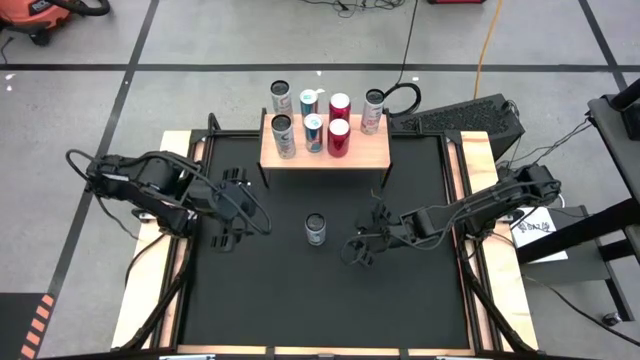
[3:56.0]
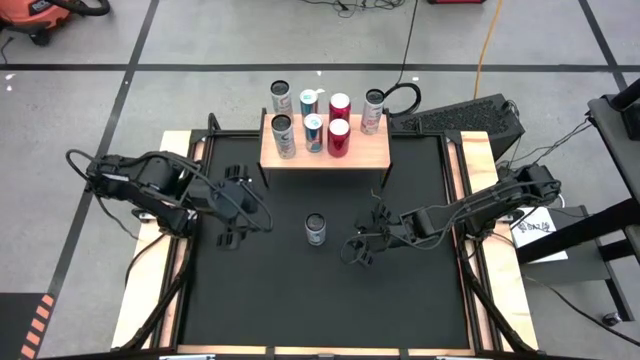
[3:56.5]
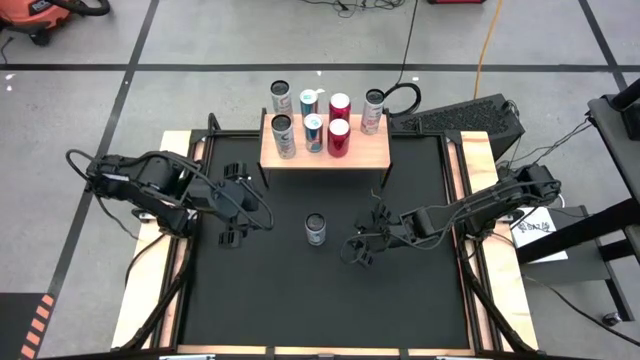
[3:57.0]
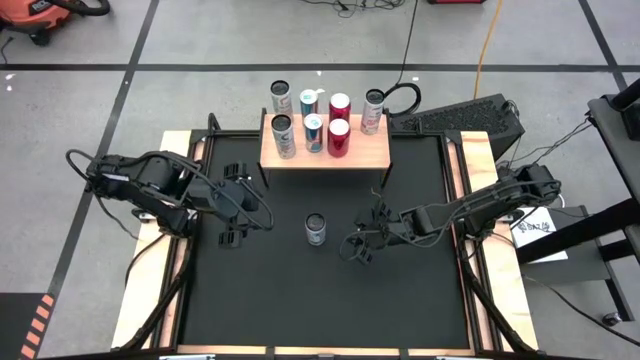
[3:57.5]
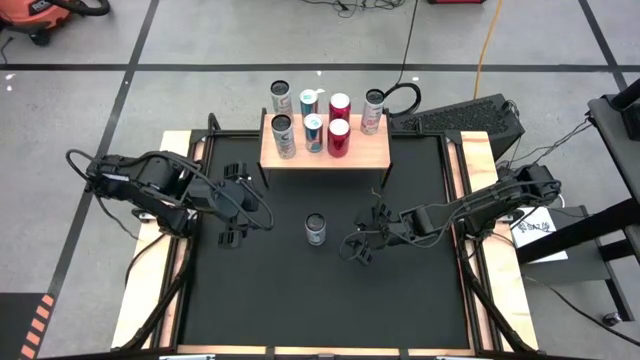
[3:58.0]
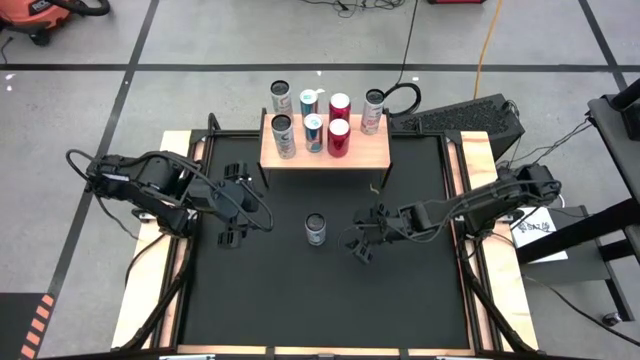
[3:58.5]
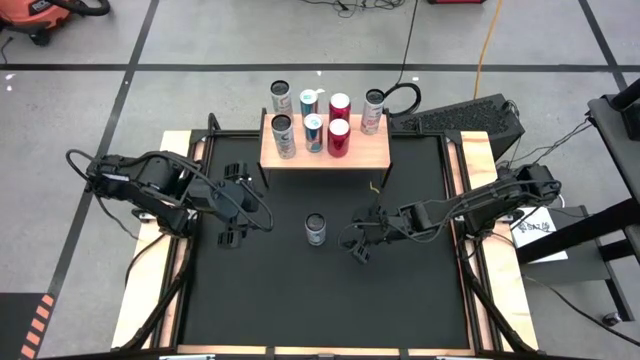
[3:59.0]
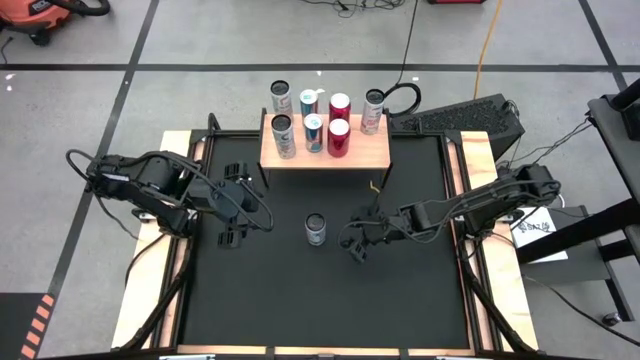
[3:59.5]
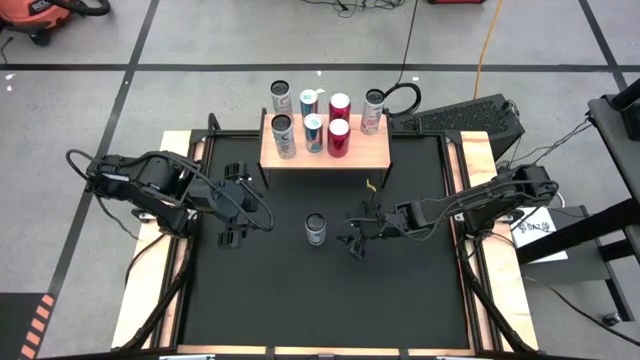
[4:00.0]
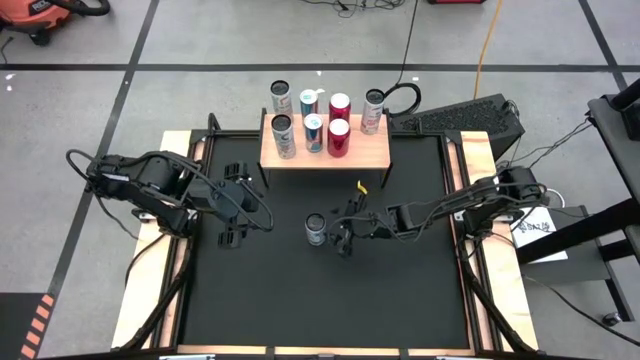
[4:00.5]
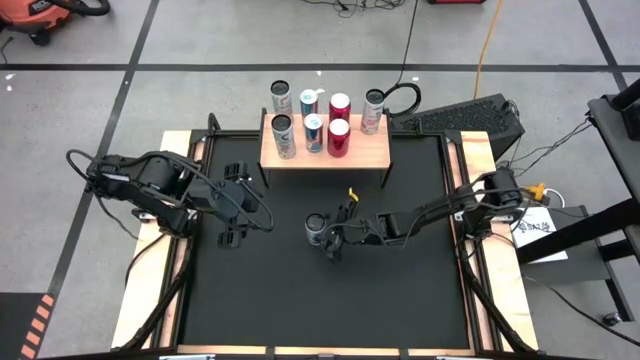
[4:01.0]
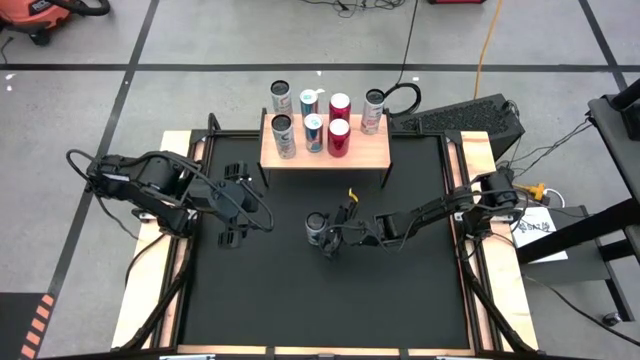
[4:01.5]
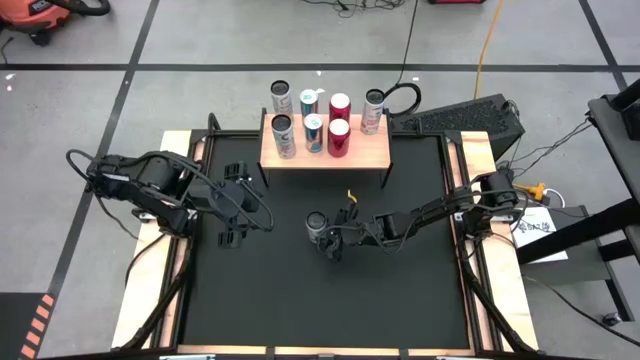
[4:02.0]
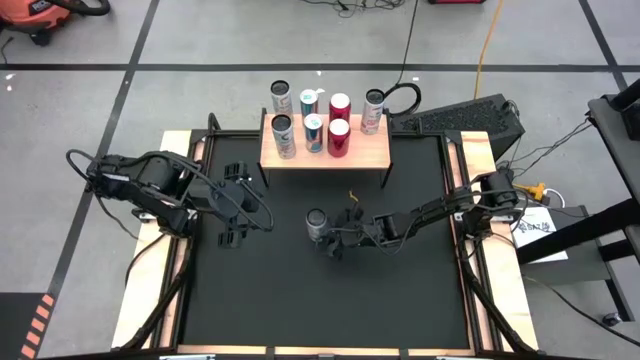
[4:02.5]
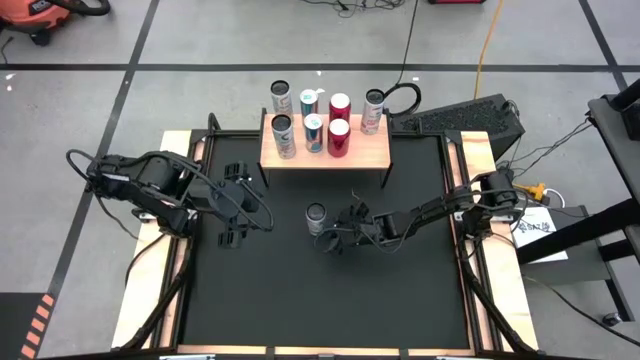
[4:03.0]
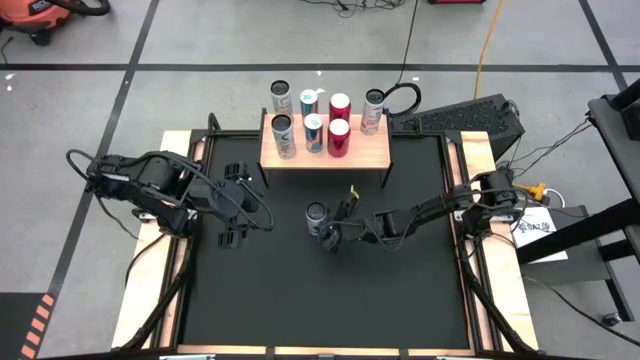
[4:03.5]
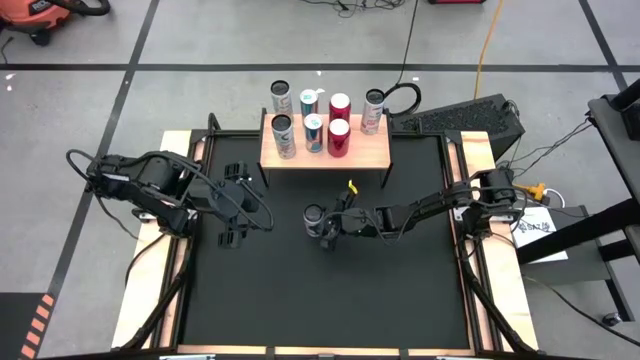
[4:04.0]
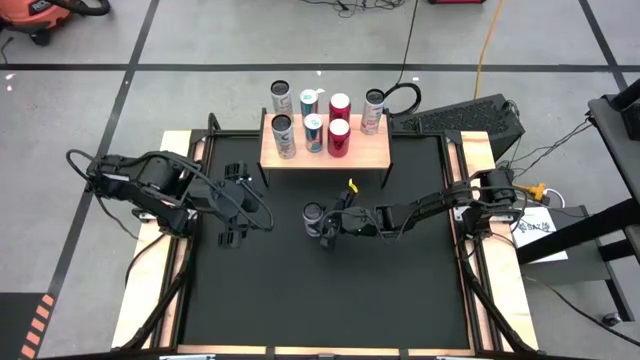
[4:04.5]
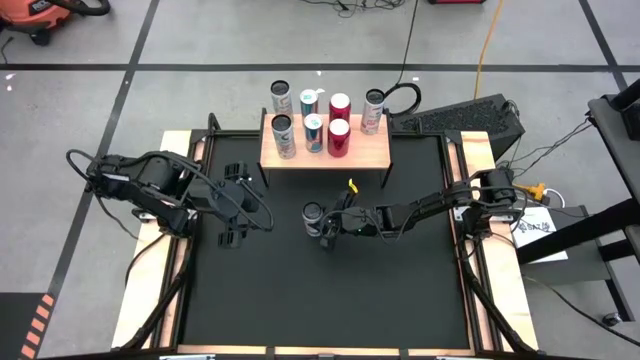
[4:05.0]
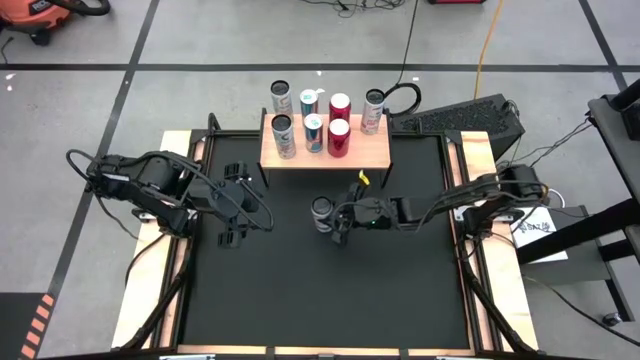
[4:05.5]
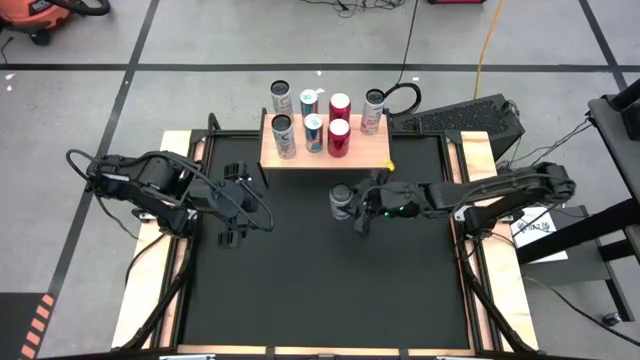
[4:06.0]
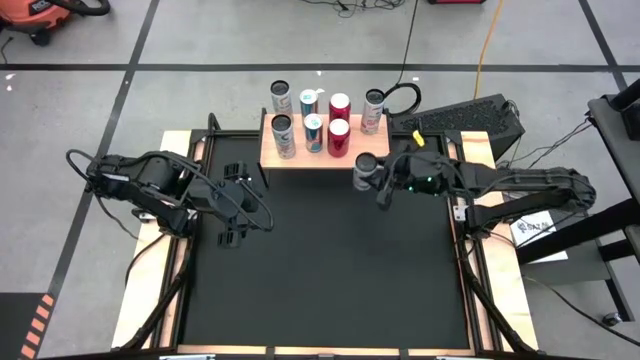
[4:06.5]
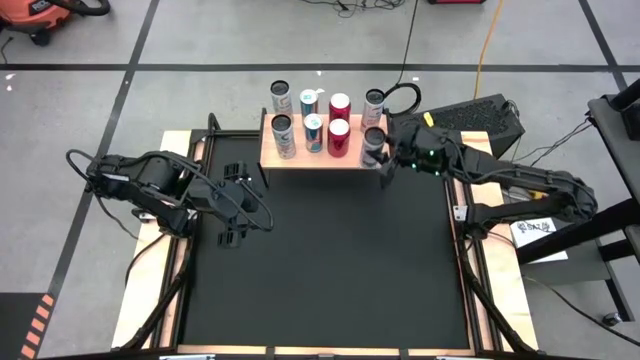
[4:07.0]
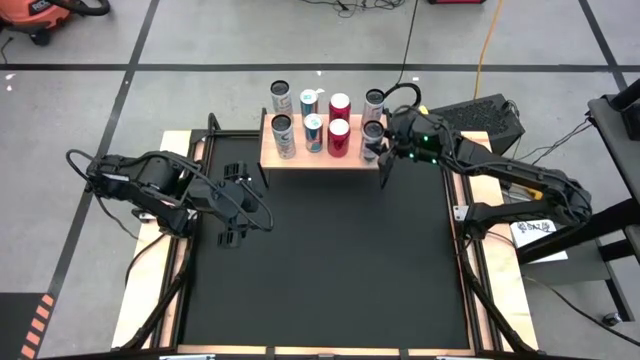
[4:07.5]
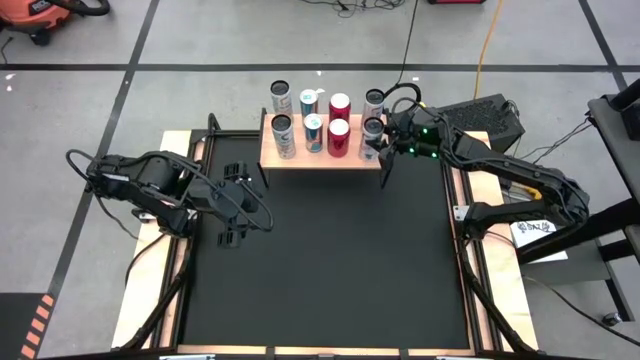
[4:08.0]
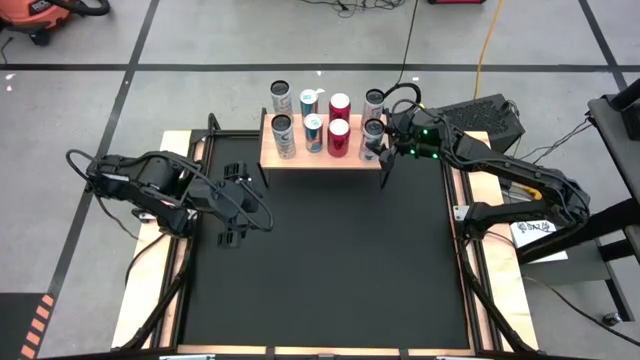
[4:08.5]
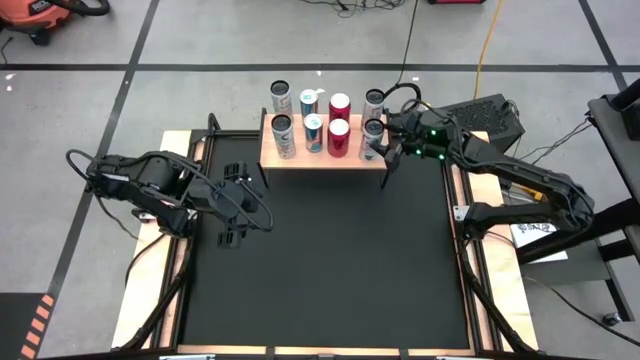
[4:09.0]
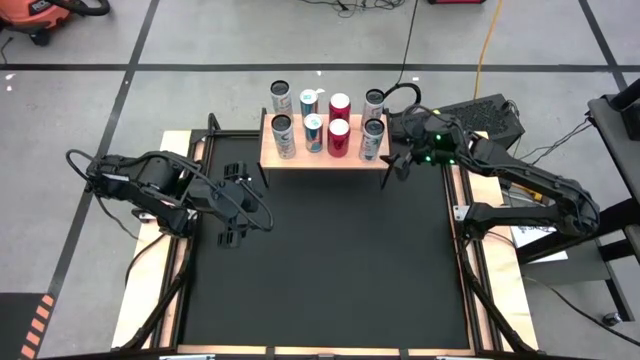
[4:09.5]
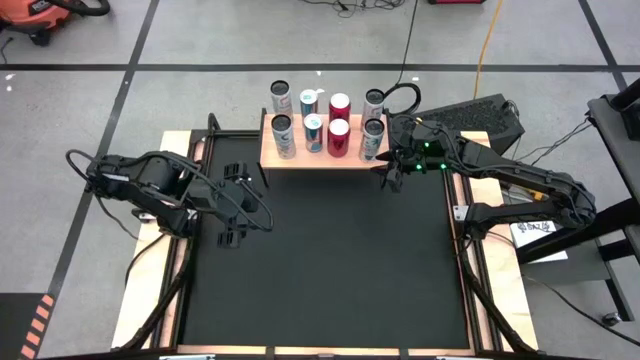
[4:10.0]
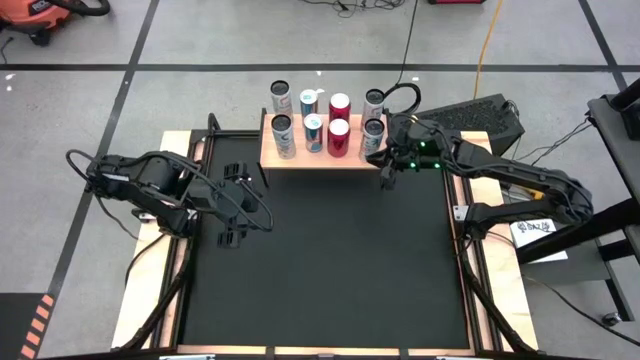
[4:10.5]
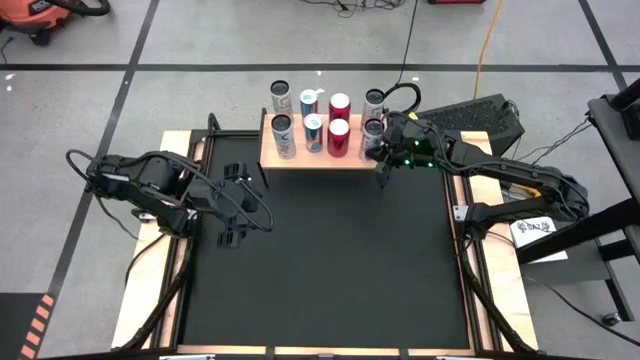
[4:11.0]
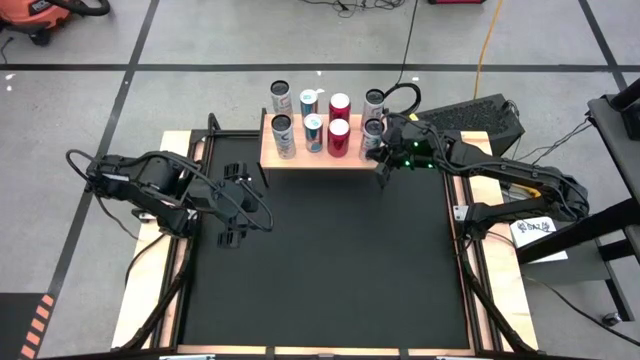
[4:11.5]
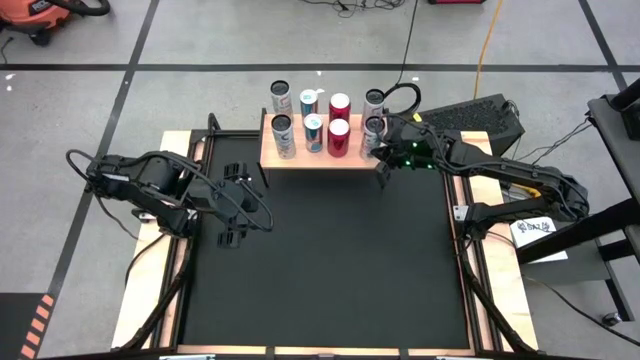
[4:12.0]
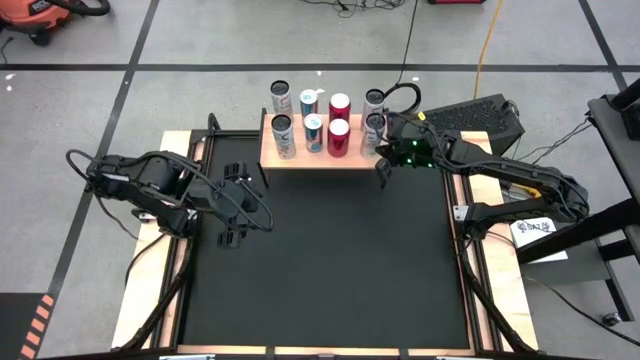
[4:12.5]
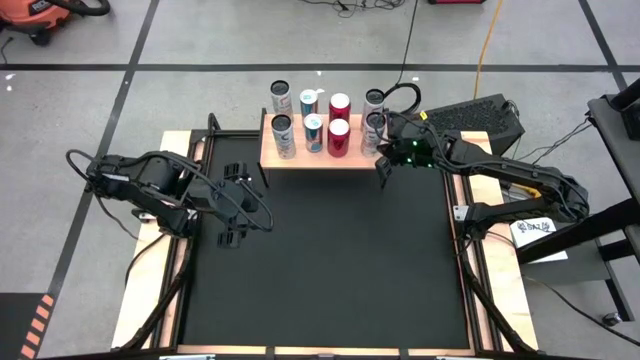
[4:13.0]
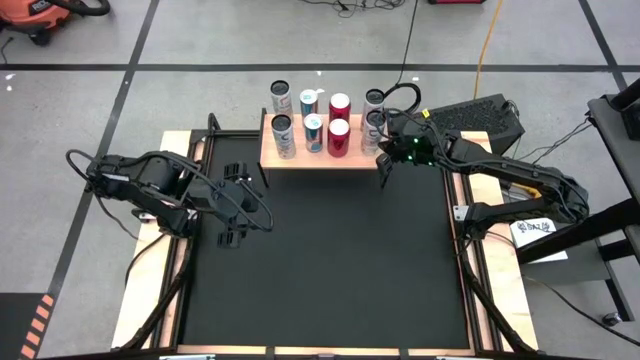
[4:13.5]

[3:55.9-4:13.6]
Task: Place canned beverage on shelf
Put the white-pink soda can on the shelf

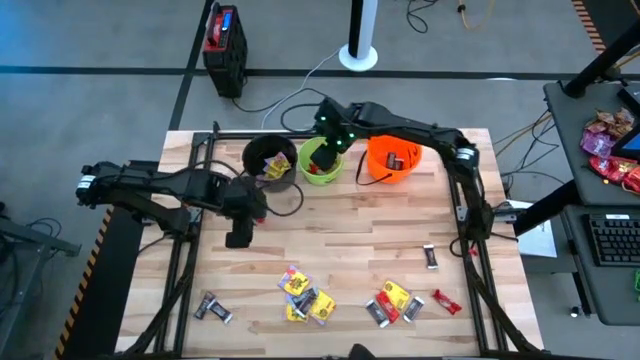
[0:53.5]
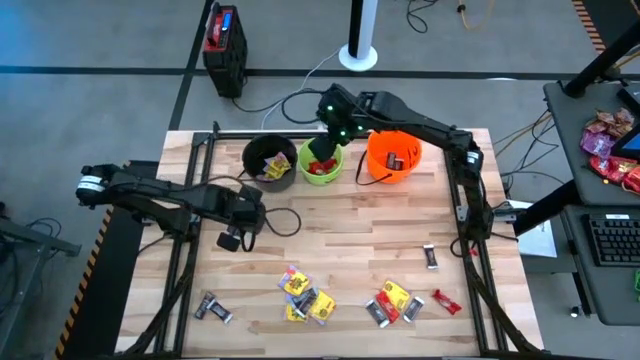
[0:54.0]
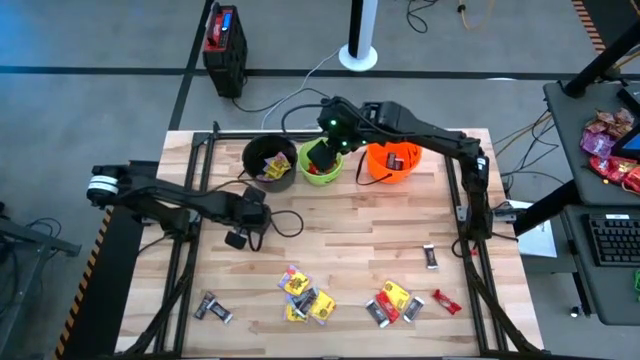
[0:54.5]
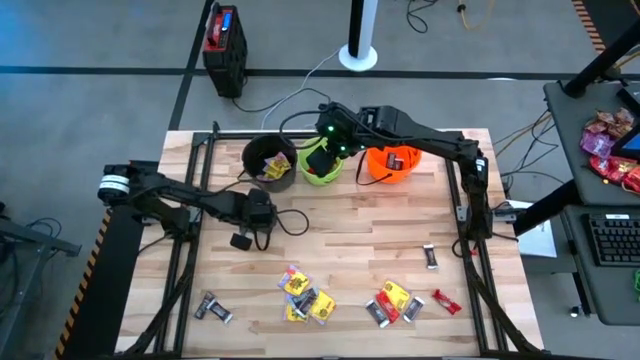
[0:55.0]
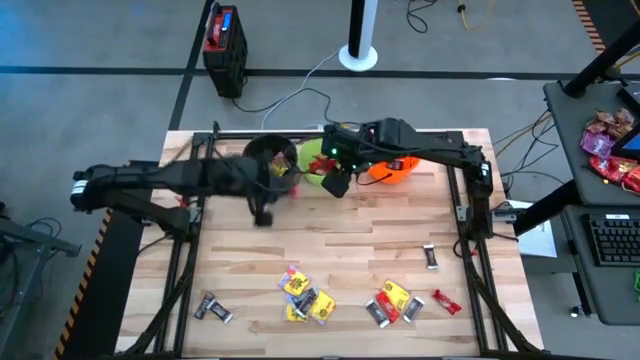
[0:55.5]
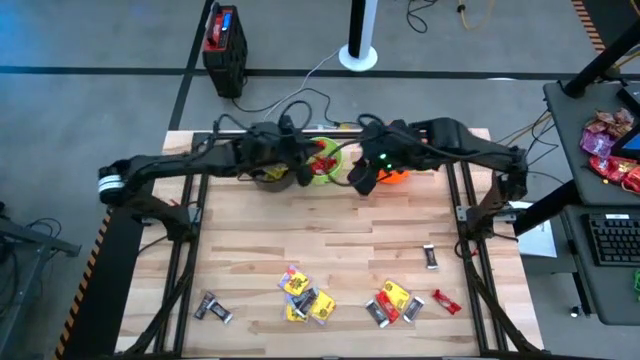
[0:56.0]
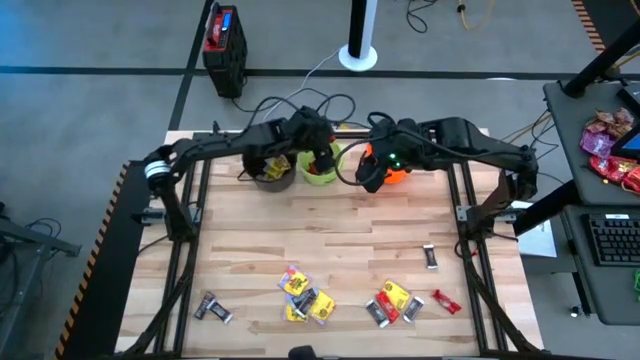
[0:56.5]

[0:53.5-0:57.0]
Task: Sort candy by brand, put in halloween buckets
Put the red chocolate bar into the green bucket
